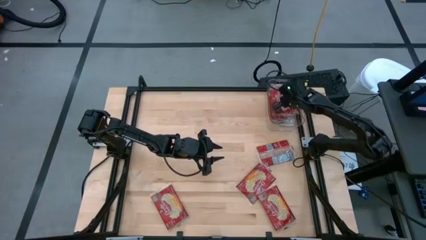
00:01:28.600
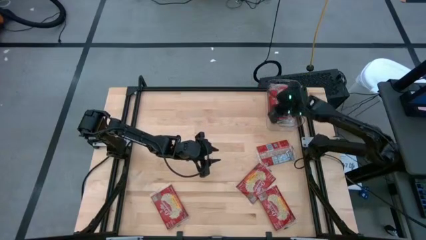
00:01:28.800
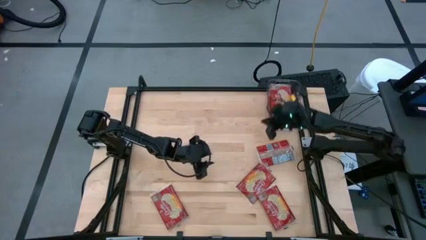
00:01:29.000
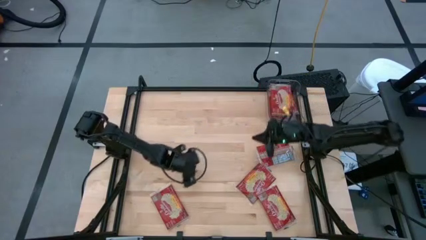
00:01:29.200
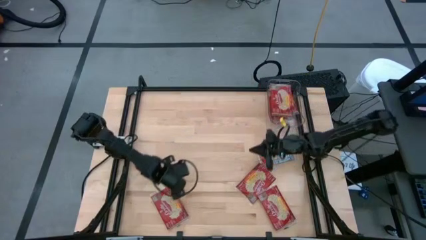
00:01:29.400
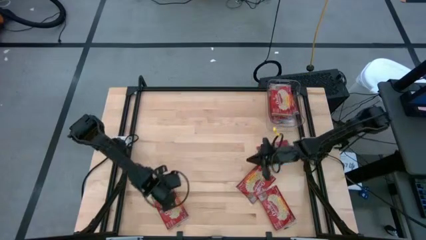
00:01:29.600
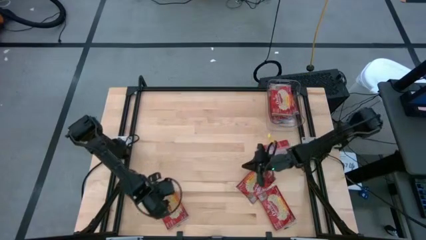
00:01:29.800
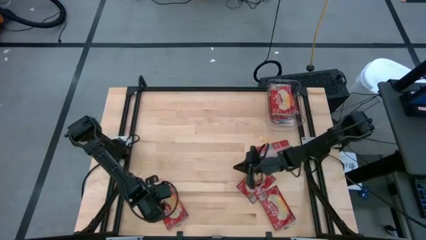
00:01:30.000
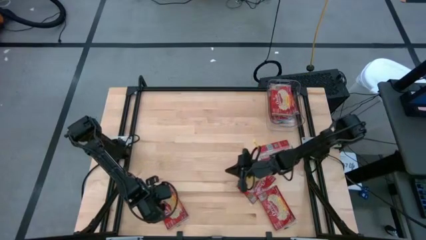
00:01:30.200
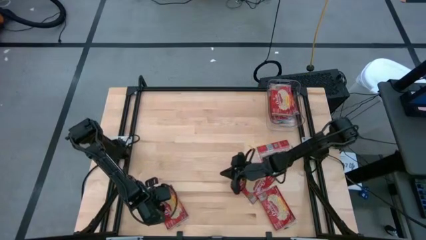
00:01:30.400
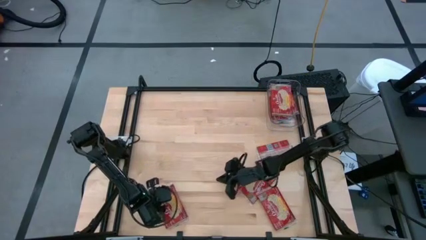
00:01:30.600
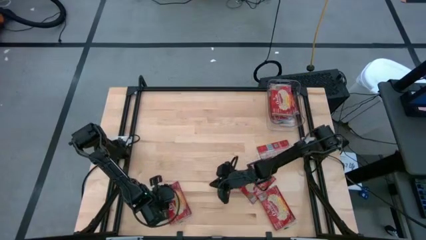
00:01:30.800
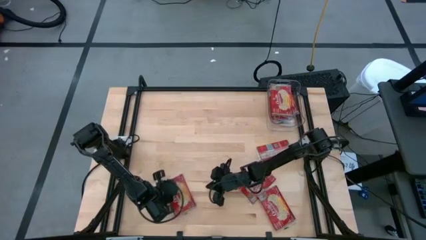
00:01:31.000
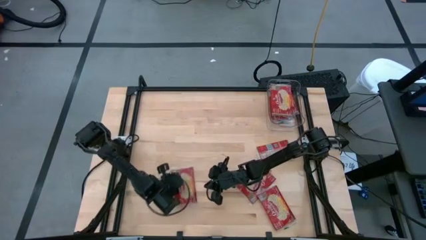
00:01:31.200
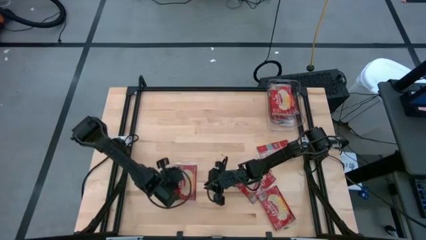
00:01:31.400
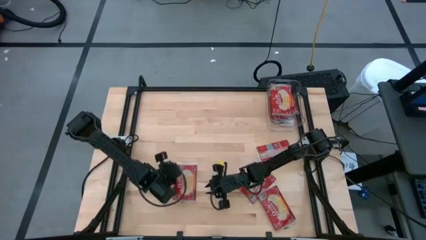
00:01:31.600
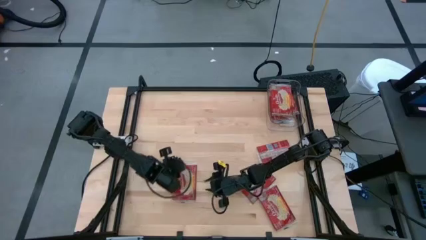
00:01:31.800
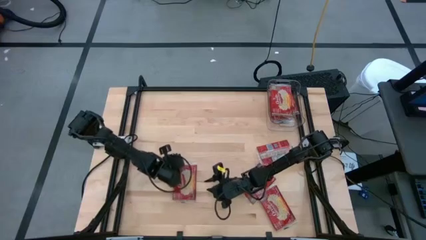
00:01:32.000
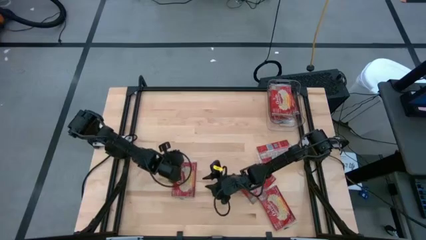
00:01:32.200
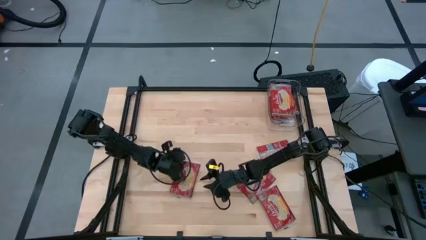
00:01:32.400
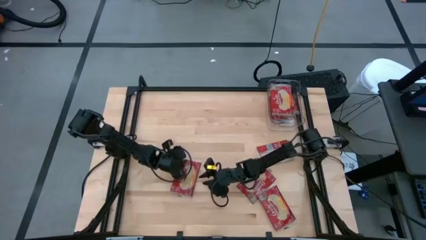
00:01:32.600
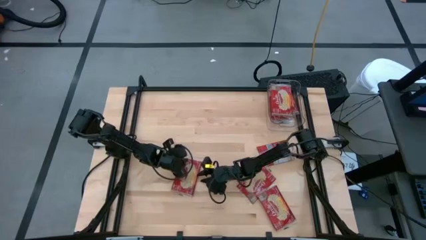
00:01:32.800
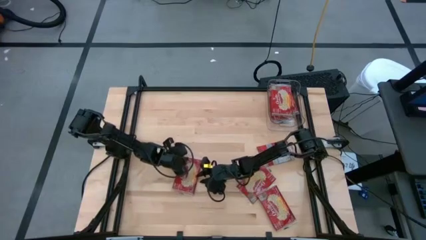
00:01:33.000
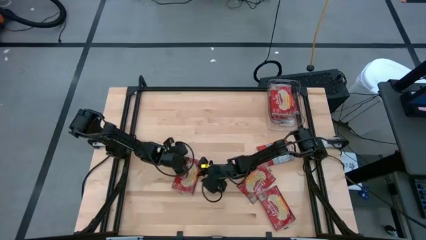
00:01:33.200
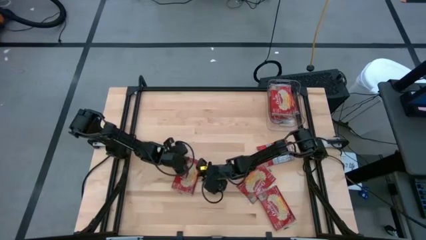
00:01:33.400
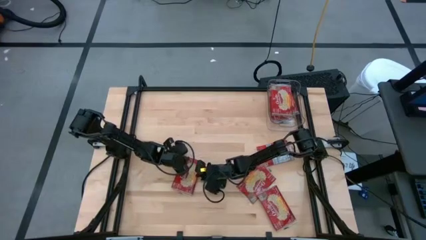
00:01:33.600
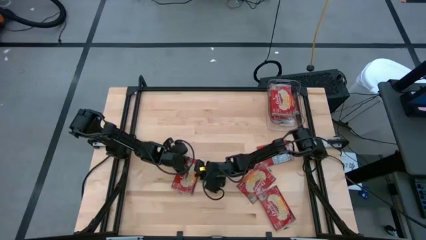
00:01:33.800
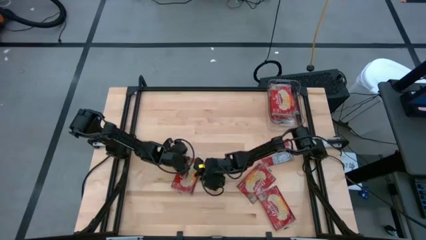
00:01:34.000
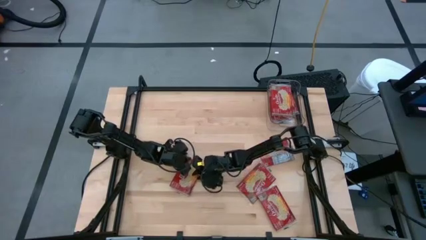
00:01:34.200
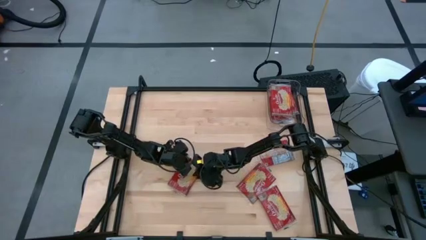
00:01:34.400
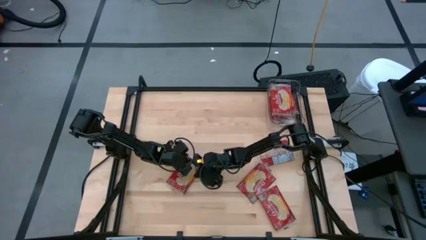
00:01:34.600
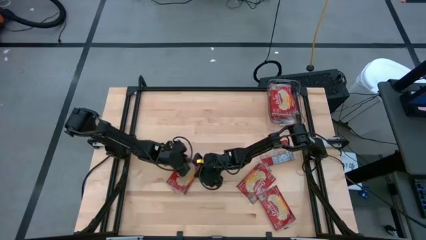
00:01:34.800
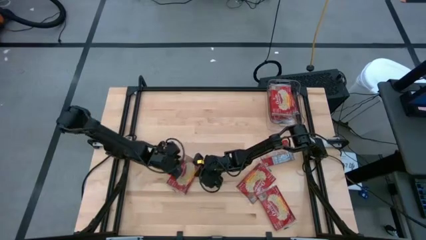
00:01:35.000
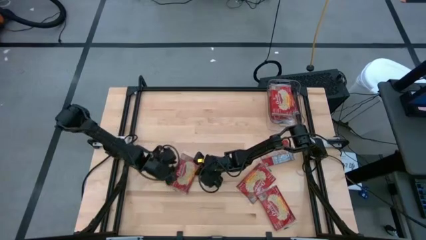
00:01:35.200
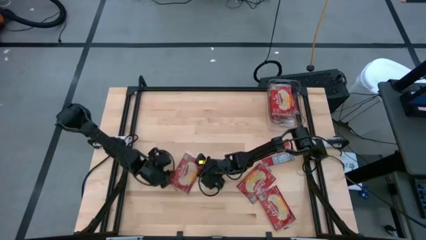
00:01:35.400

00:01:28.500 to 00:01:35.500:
Task: Sort popcorn bags into baskets
Put the red popcorn bag into the transparent bin

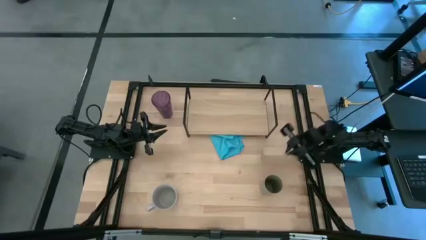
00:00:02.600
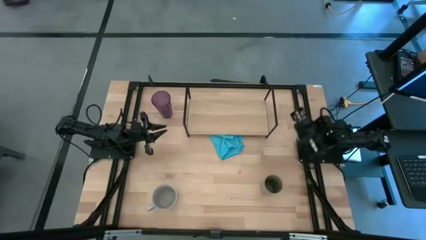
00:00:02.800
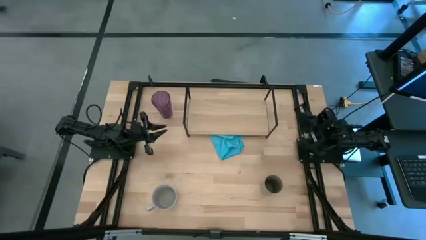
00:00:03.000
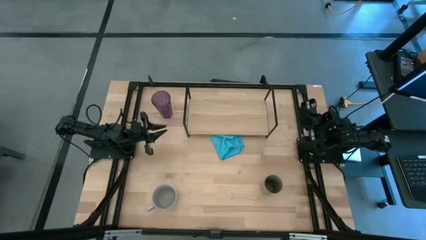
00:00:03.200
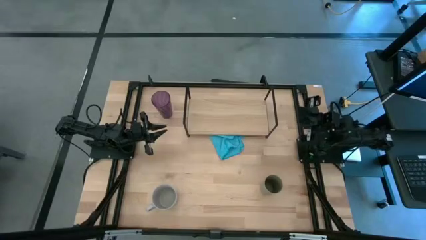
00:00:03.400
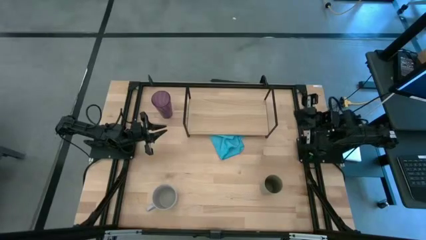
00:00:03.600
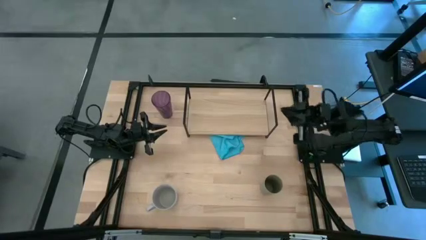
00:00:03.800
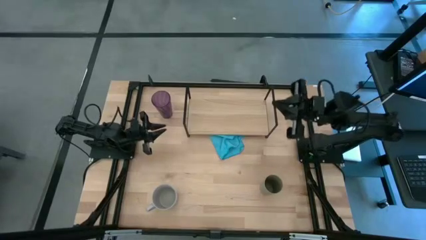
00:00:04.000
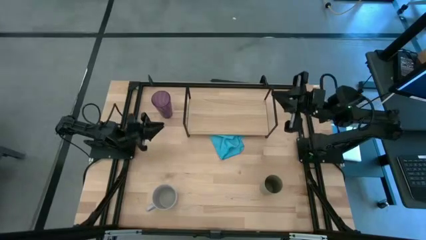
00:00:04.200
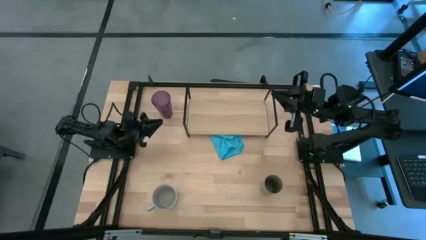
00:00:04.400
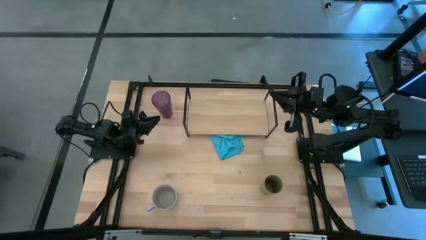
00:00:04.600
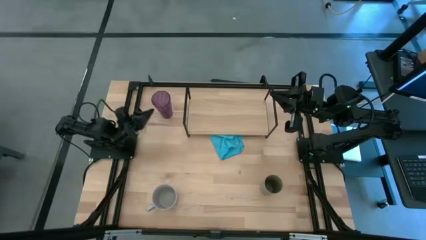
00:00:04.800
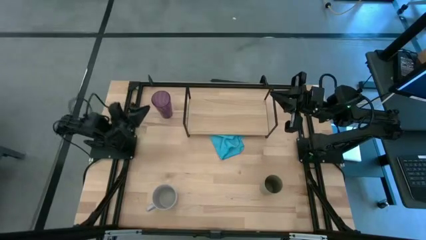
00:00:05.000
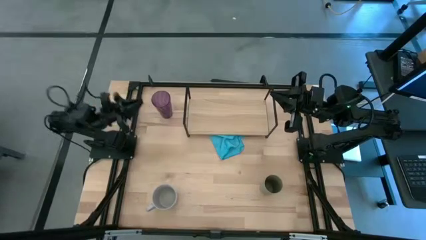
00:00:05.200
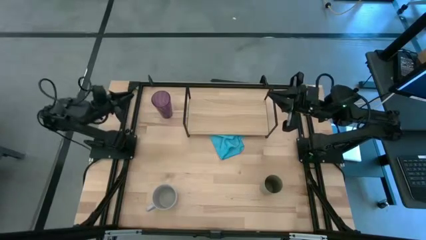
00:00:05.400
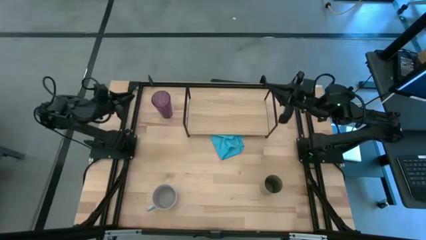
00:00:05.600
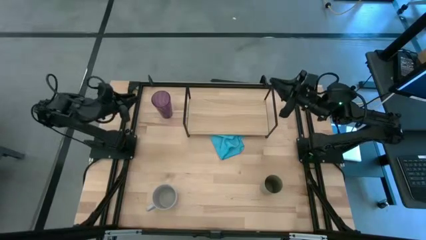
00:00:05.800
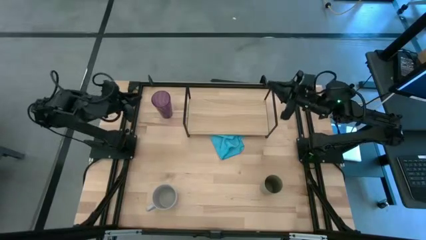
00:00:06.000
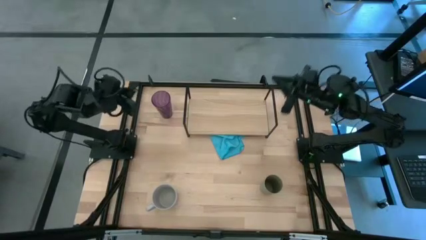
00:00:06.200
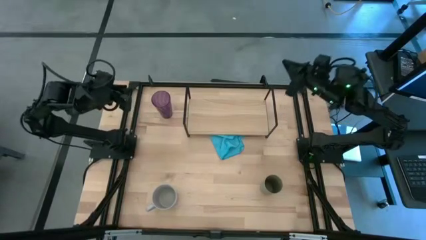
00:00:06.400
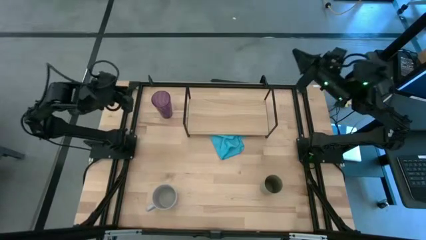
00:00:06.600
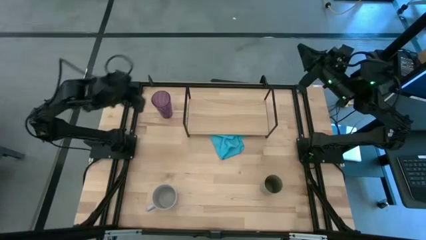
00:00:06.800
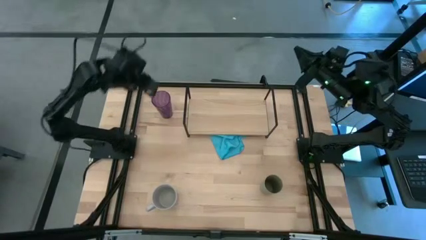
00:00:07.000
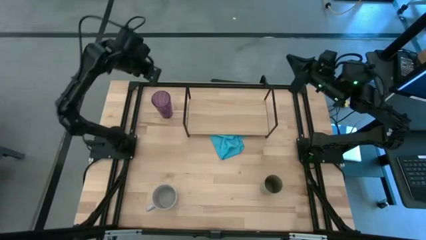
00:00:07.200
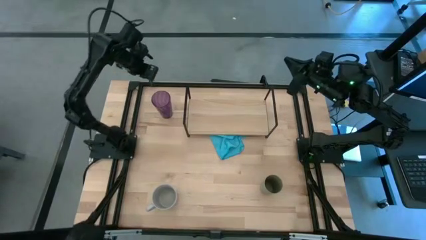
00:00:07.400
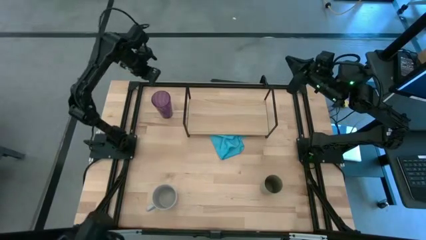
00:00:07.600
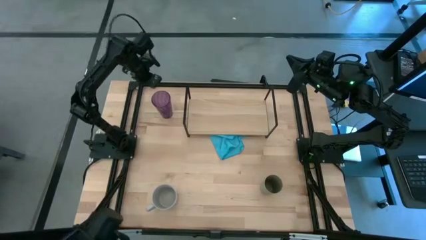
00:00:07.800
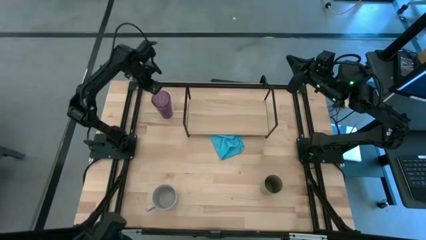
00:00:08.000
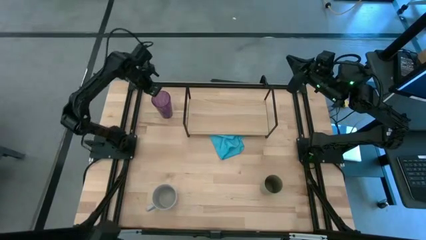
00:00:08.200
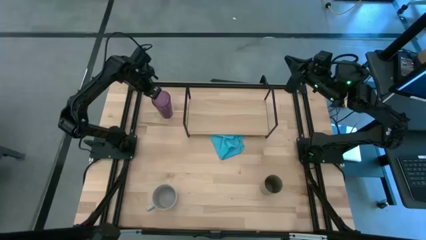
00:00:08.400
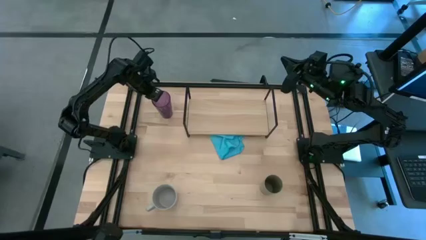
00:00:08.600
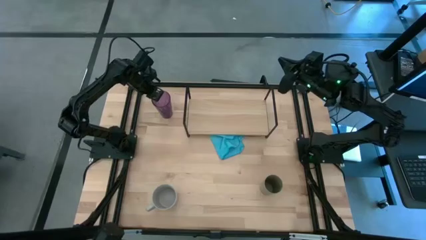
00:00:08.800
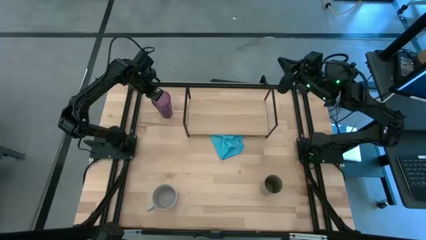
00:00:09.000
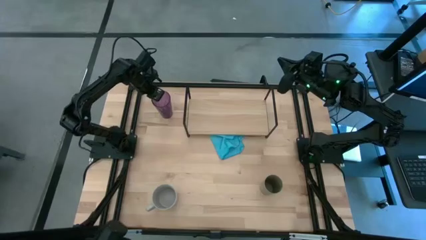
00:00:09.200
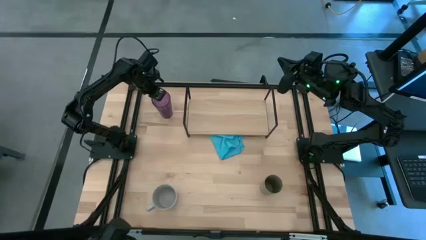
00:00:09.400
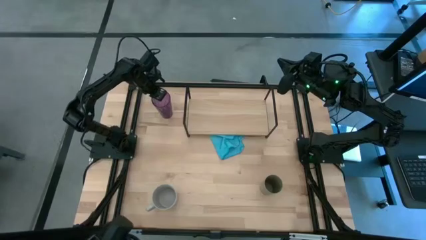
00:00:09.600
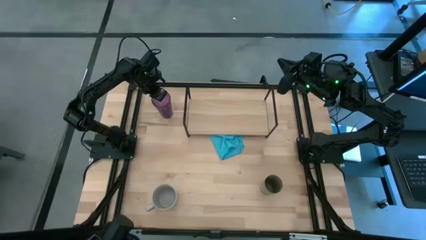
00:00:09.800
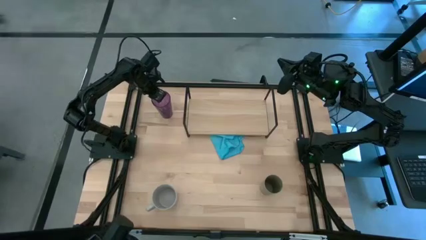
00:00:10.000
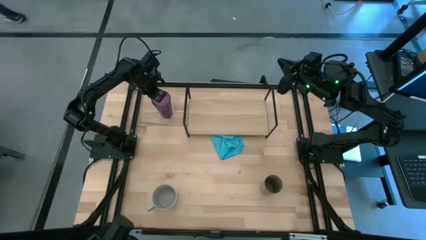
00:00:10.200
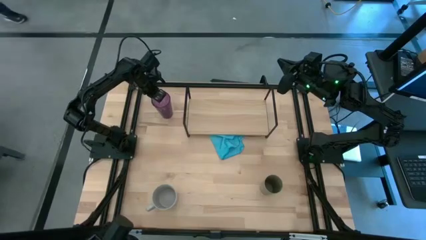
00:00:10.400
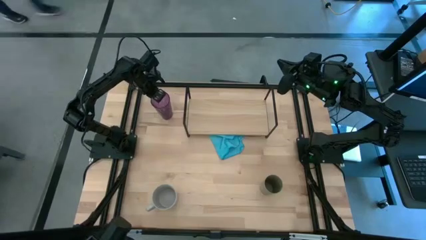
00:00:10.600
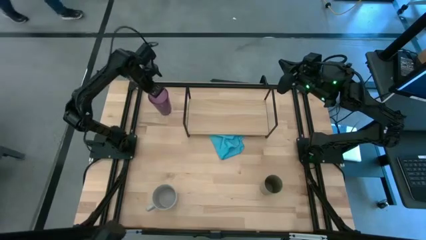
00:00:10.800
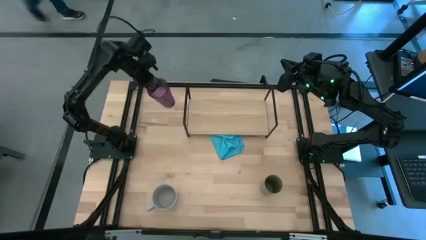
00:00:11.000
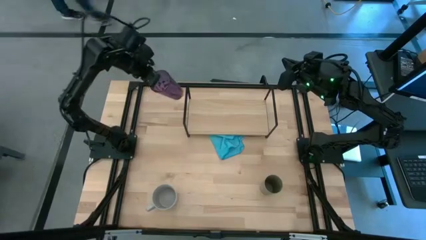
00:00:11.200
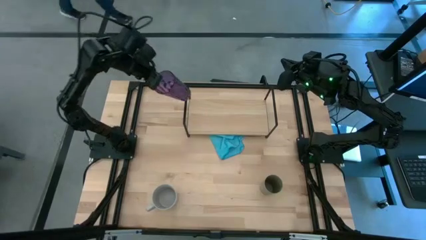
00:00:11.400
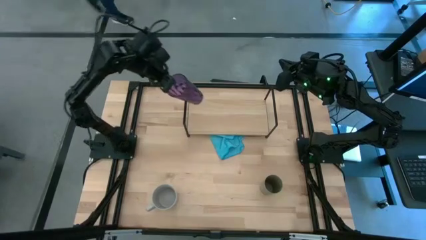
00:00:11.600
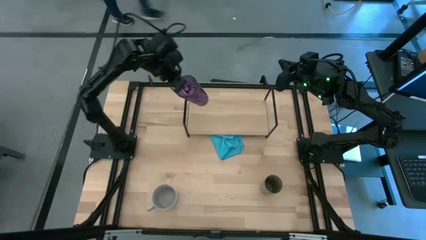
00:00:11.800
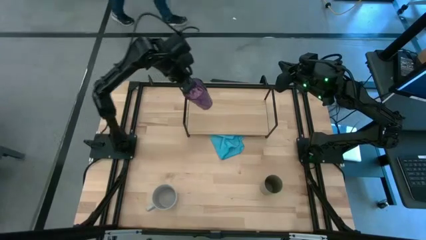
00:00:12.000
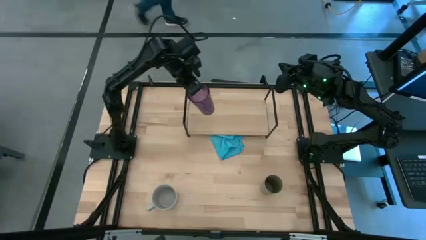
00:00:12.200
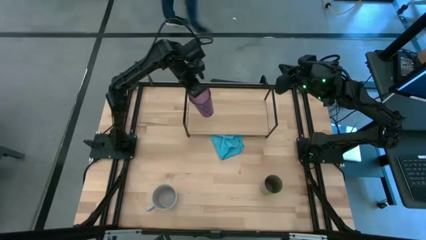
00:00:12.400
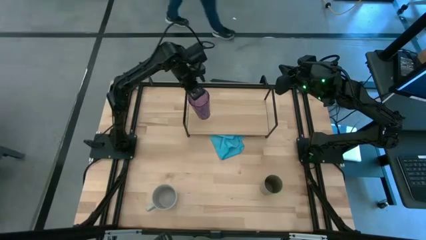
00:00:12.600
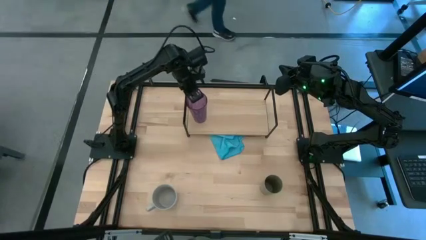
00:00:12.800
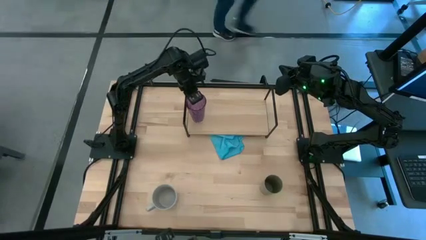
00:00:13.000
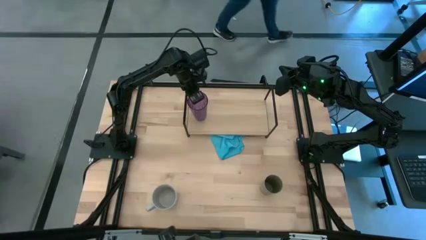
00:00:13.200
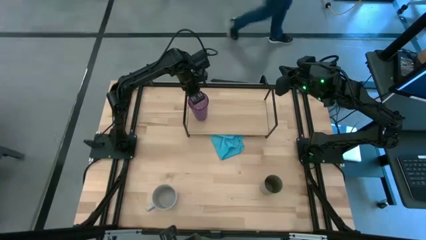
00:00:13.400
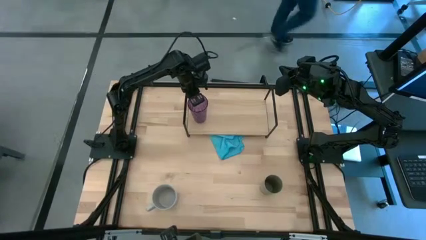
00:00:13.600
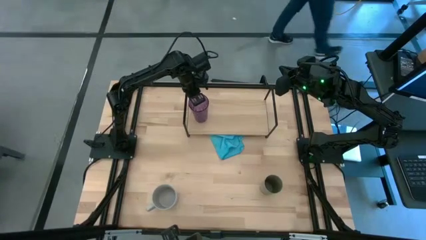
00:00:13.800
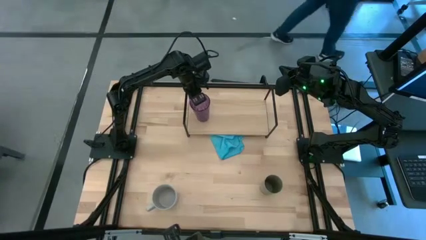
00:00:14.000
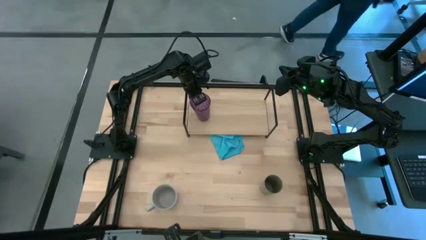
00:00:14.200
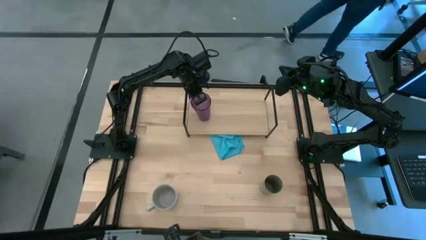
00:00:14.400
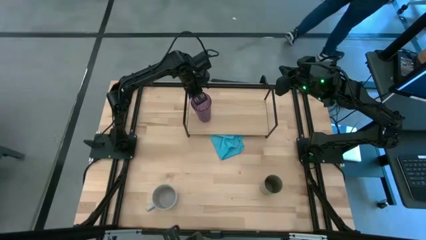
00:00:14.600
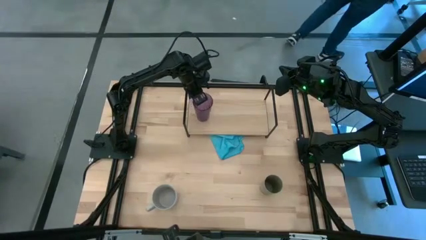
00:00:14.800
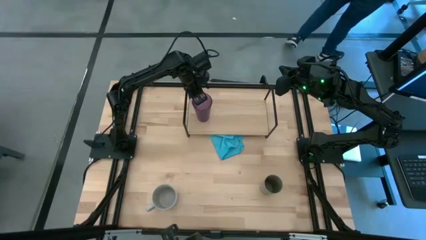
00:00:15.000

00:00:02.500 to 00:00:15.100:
Task: Stack small to large cups/mugs on shelf
Put the violet cup on the shelf
